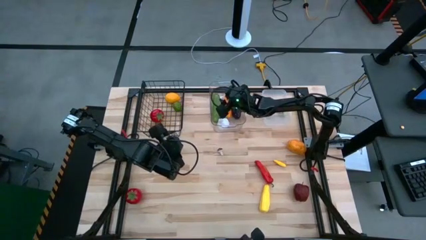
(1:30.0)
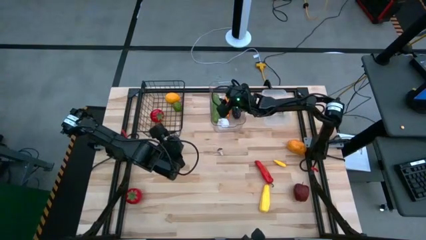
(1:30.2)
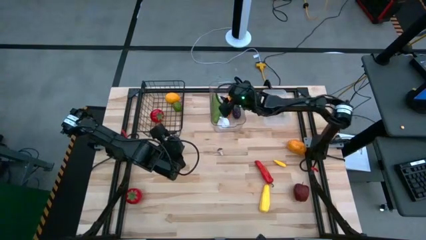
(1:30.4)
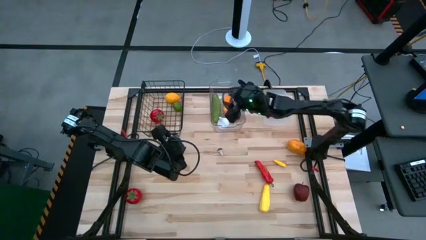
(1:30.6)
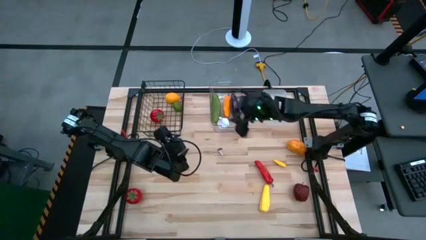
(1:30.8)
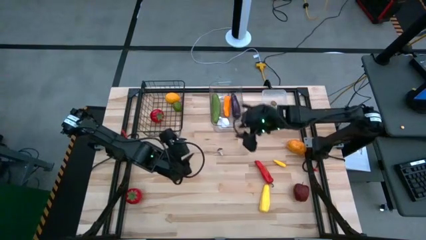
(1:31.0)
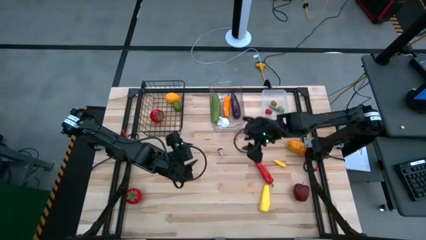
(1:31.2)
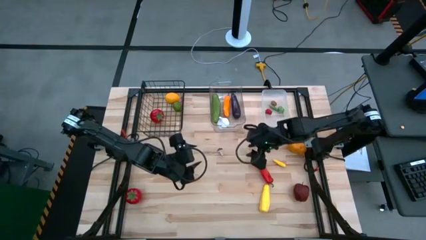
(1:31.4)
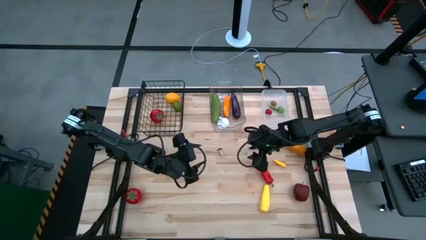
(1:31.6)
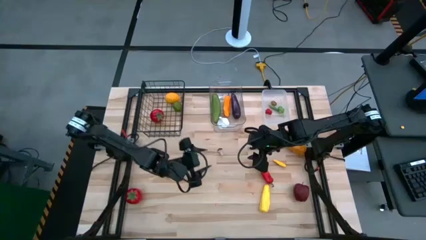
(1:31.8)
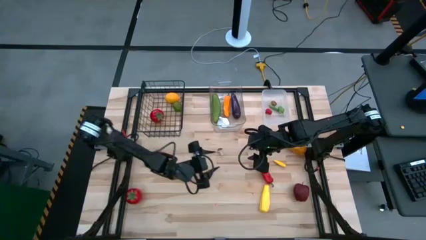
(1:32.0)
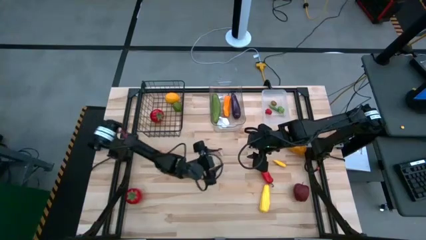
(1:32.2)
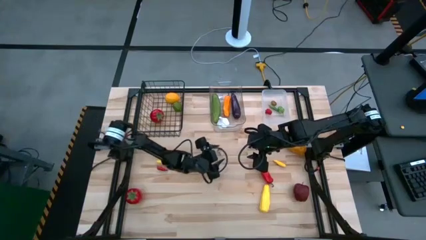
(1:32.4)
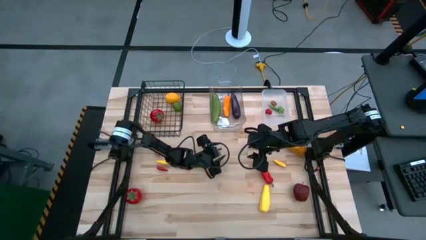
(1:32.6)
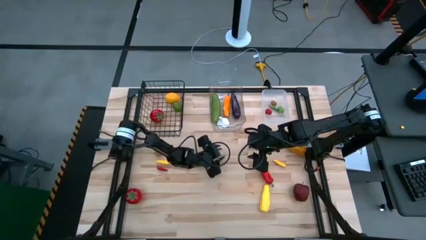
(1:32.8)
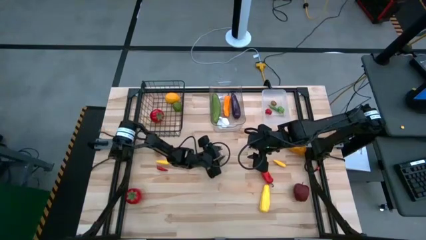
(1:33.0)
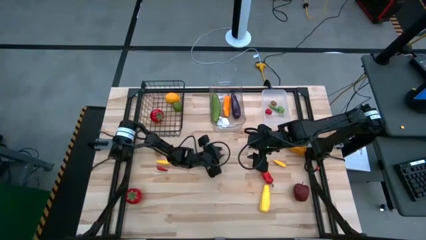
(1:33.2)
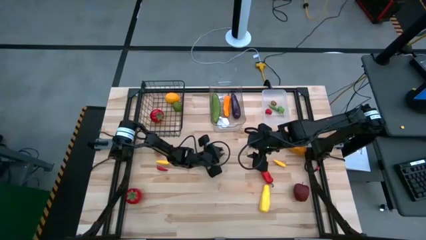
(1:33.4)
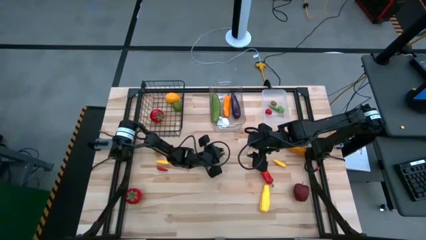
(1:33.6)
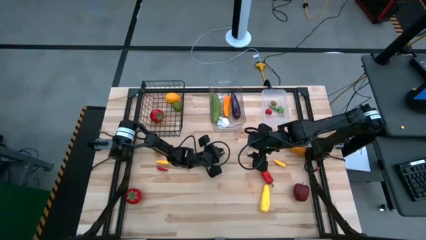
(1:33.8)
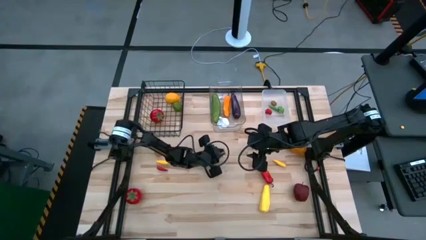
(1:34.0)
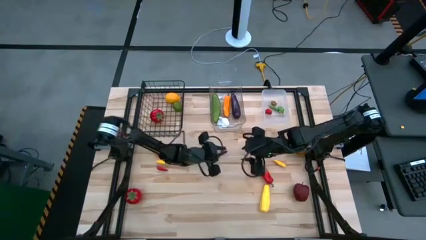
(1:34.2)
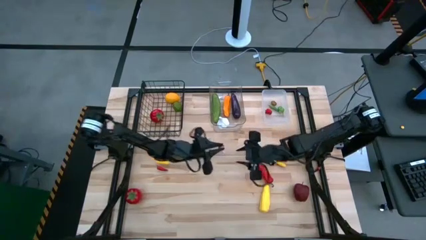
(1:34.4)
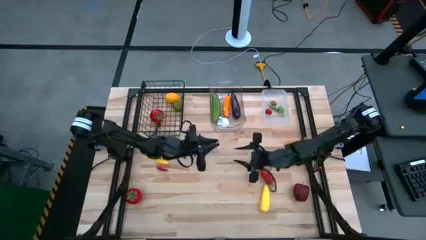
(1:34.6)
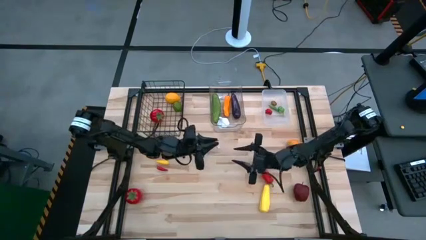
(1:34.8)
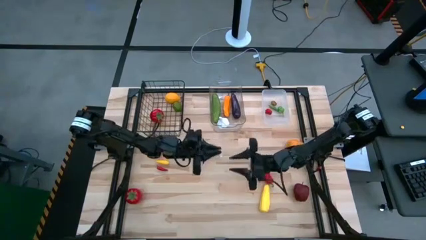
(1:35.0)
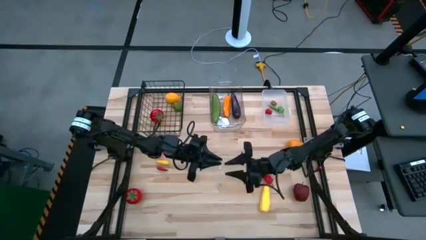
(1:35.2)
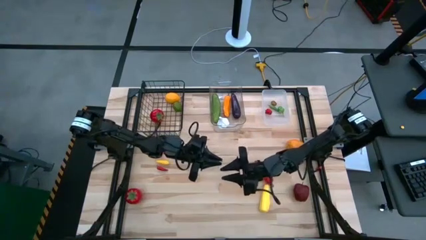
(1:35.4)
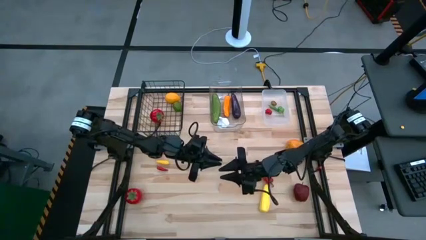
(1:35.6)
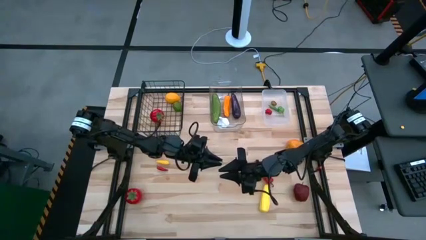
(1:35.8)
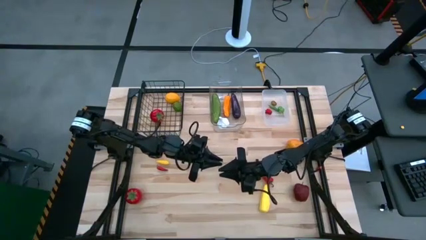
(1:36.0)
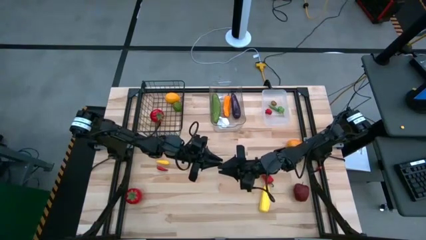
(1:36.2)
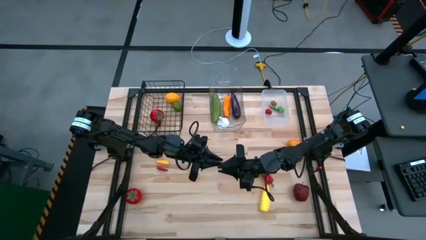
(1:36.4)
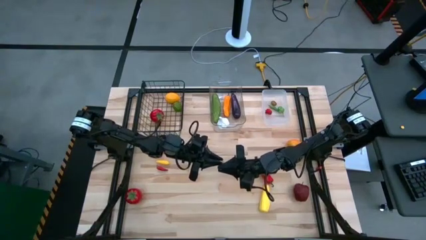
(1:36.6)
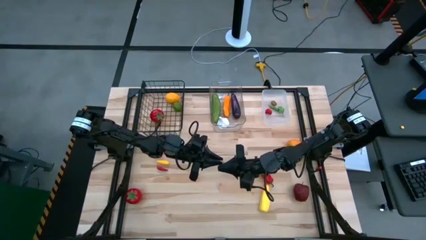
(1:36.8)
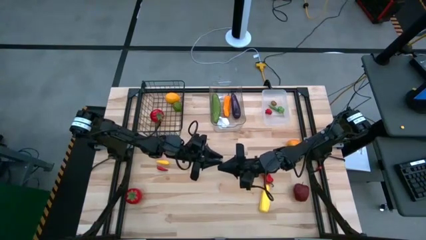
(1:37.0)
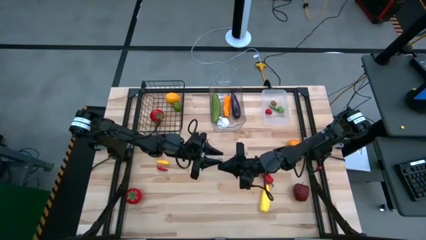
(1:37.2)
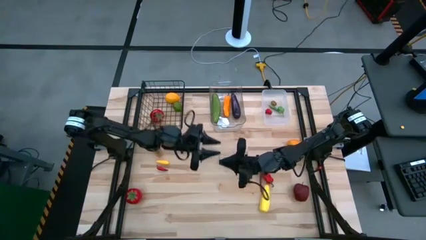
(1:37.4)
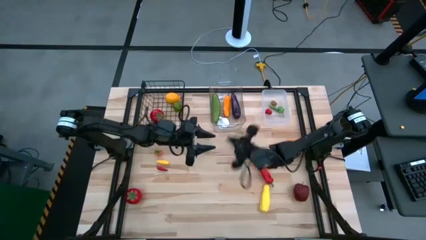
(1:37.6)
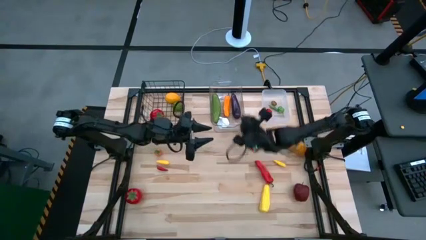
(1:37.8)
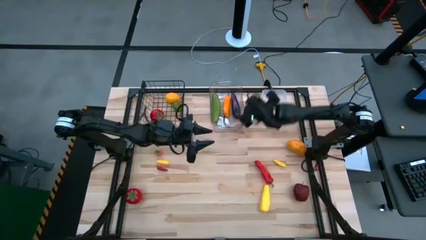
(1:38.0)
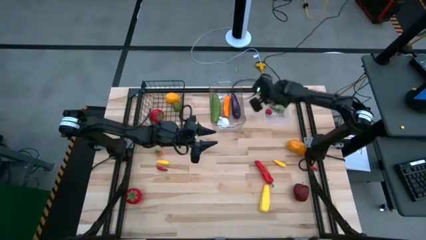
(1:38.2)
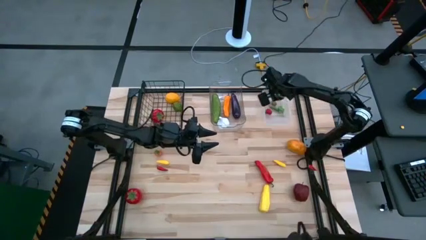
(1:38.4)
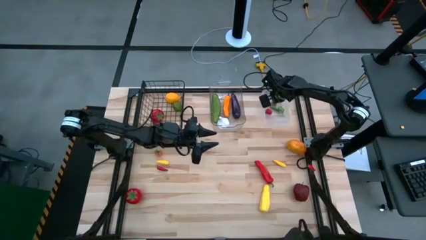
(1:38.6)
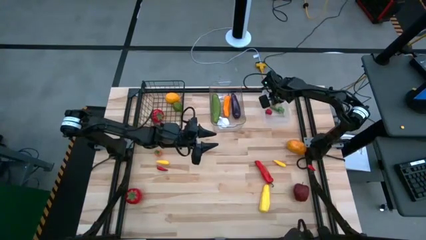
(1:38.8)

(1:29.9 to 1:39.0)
Task: Sort produce into baskets
Put the brown mushroom into the right transparent bin

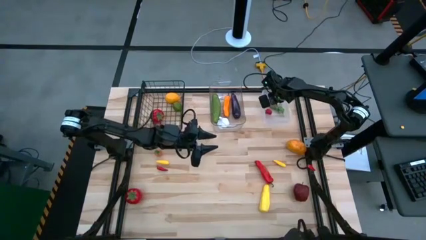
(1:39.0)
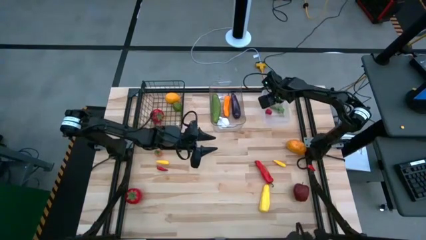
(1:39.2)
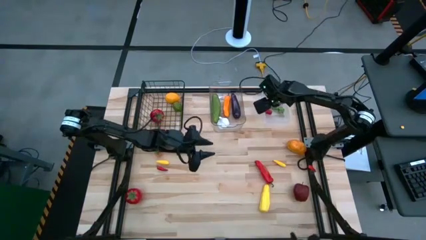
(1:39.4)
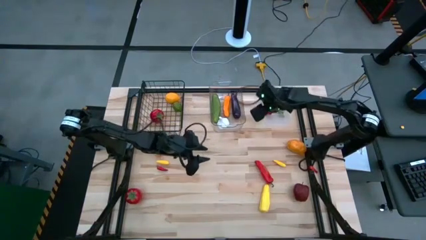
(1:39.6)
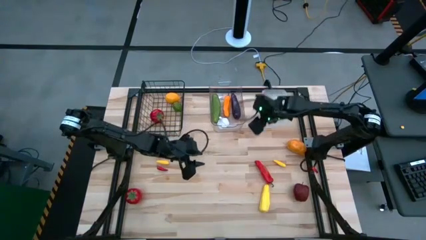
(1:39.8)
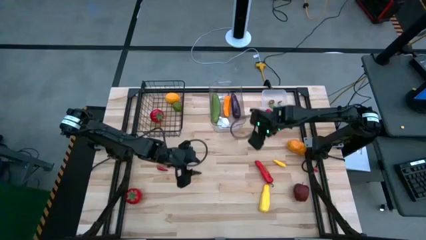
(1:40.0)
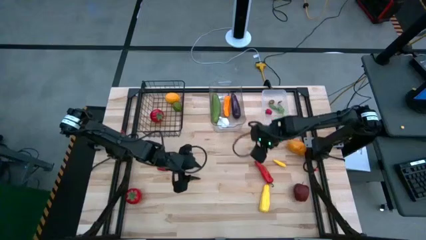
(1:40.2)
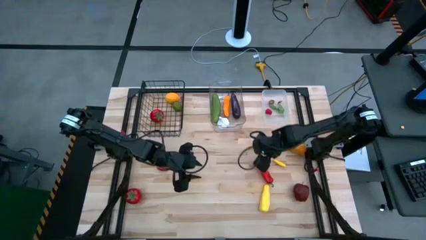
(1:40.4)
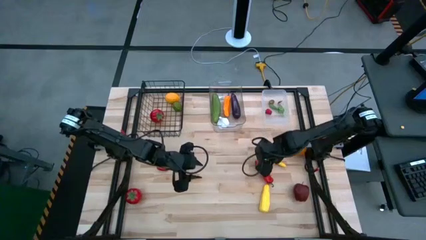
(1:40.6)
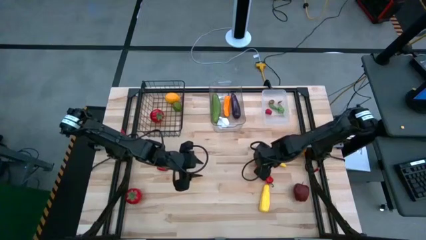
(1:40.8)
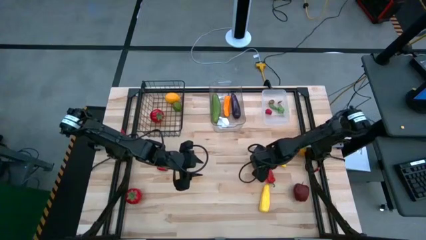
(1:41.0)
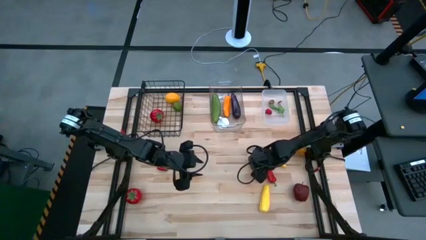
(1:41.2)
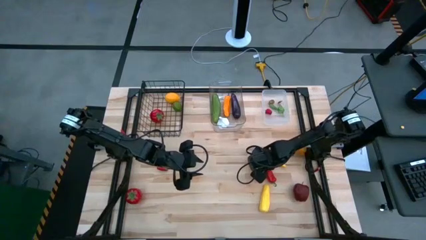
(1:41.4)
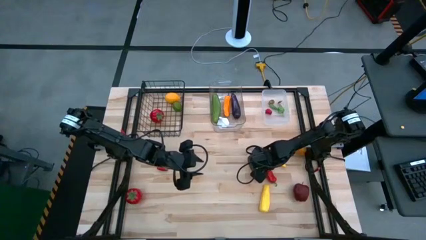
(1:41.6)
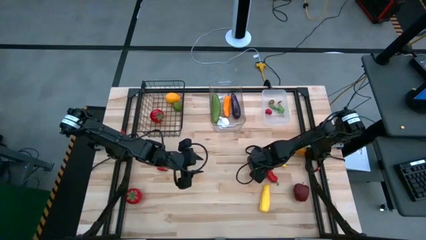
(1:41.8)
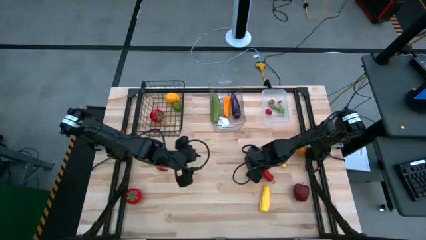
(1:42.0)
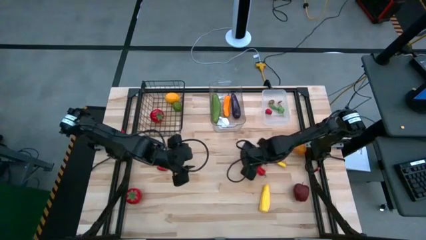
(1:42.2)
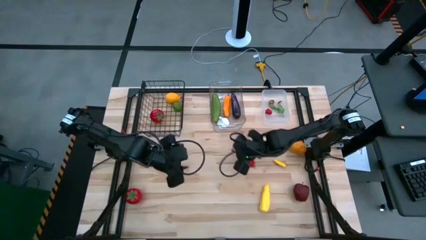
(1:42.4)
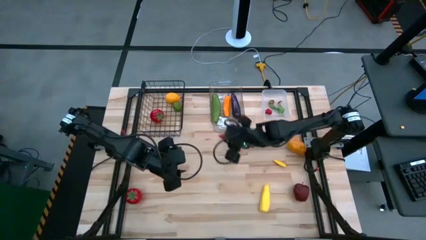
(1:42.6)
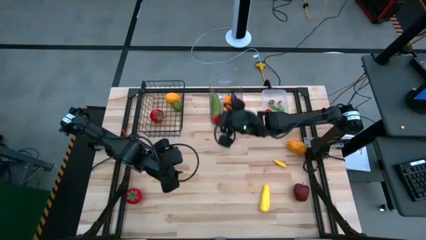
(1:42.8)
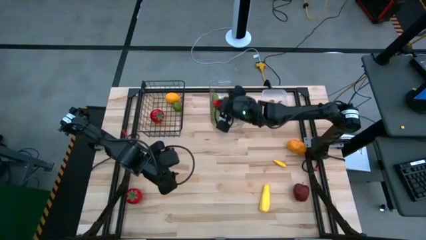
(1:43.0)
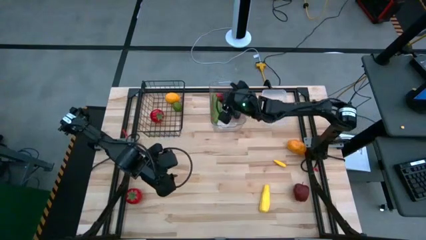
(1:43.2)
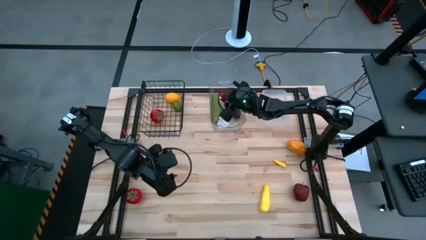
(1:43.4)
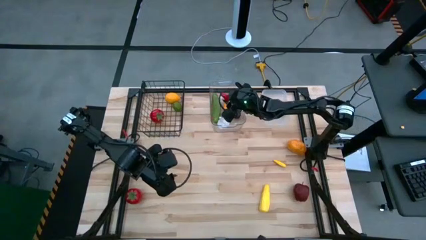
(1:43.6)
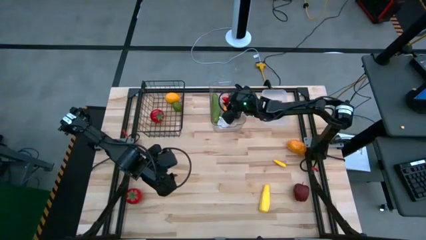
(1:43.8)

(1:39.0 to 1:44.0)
Put the red chili pepper into the left transparent bin

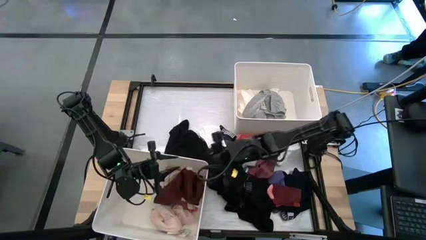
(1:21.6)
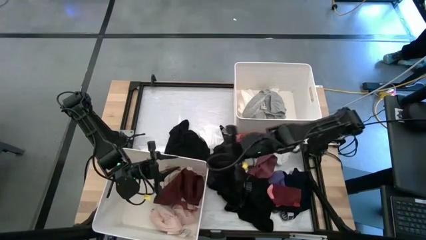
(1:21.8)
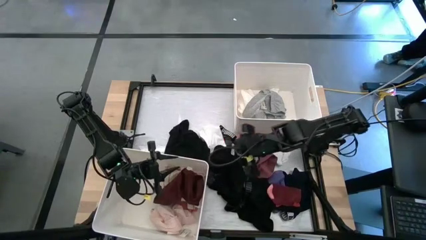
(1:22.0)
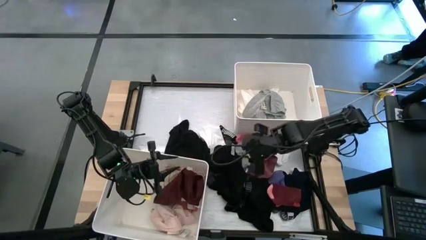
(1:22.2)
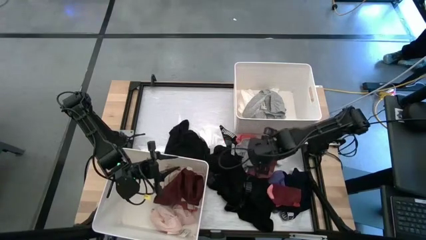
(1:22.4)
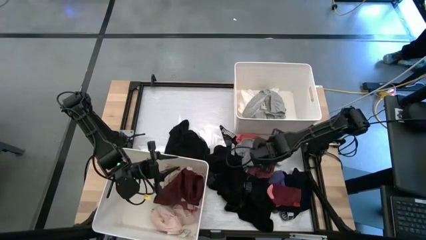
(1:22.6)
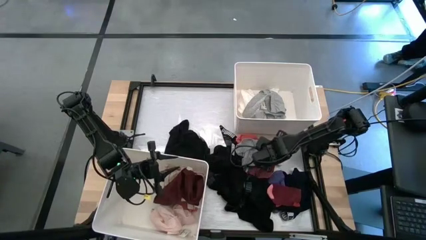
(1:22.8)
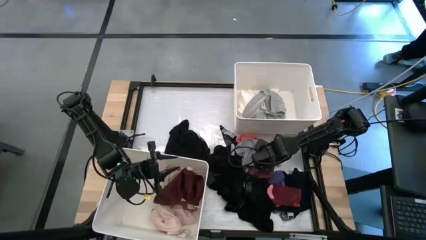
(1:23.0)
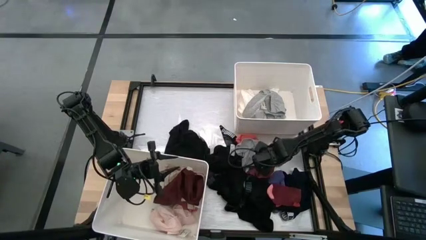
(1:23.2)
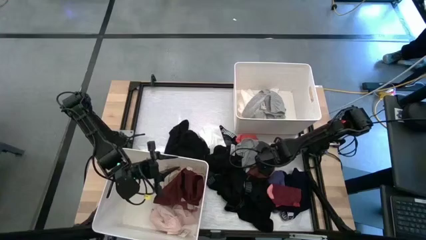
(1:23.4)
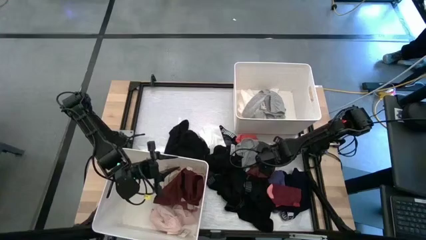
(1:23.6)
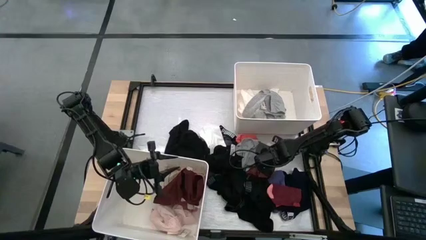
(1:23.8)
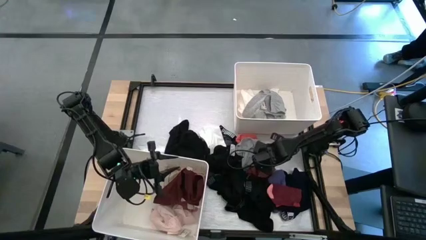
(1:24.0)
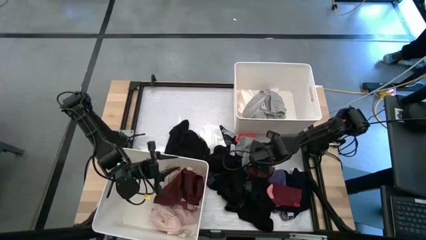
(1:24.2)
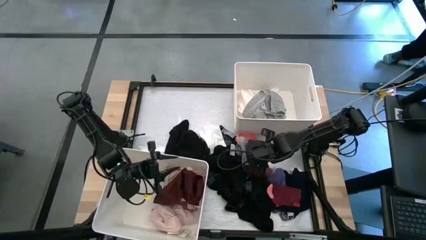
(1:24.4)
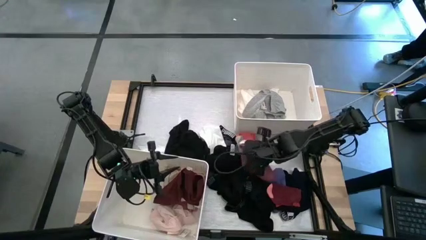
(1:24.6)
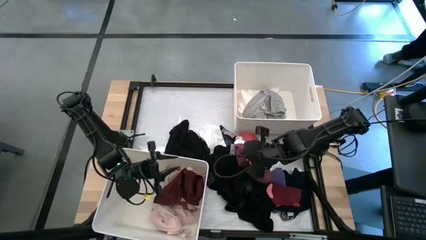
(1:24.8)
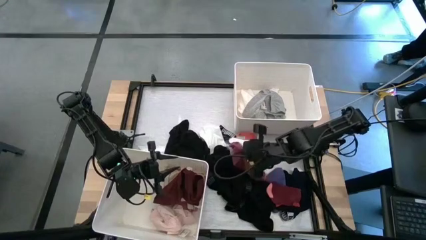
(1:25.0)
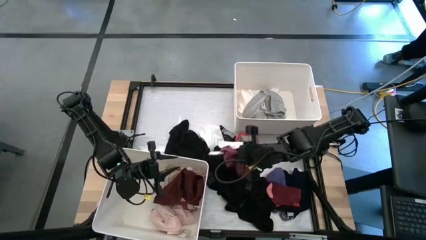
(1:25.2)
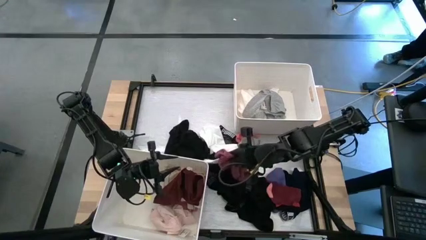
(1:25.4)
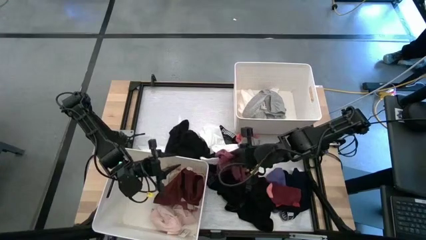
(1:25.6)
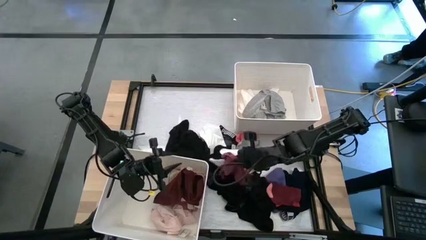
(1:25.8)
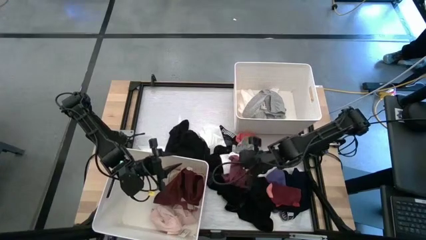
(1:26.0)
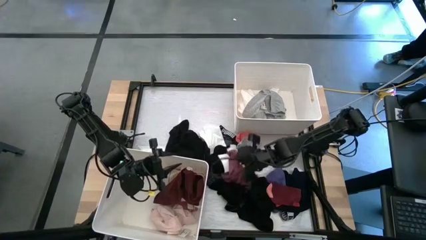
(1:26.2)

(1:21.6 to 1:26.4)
Task: Sort clothes
Put the maroon boxer into the bottom white bin
